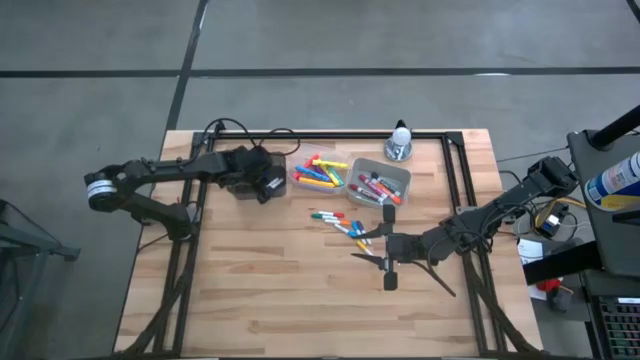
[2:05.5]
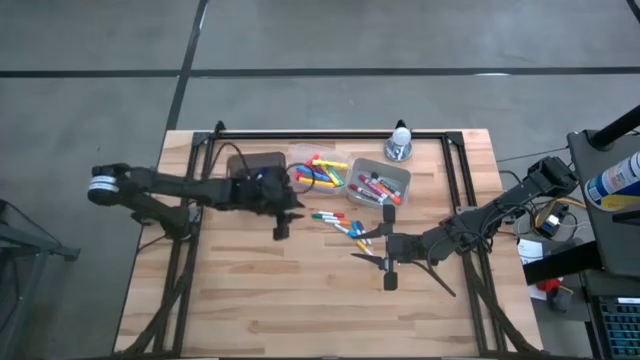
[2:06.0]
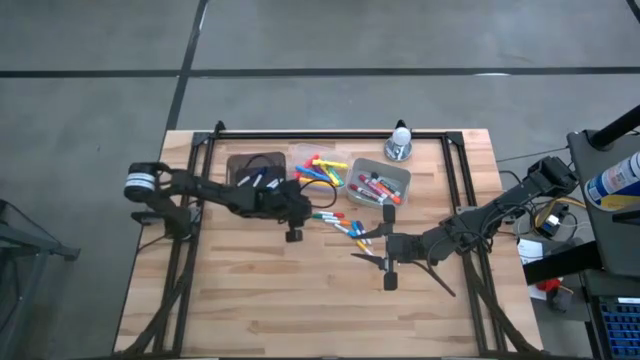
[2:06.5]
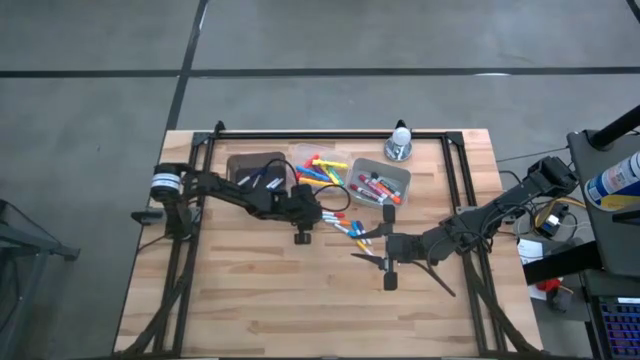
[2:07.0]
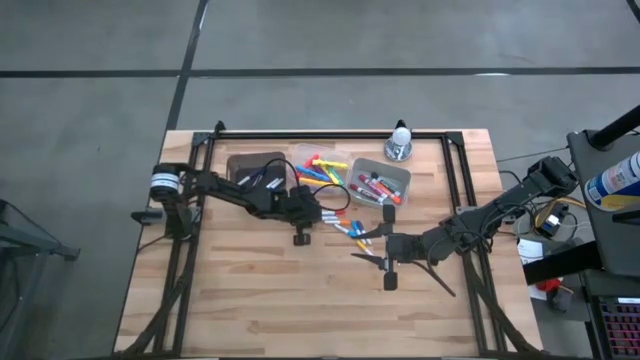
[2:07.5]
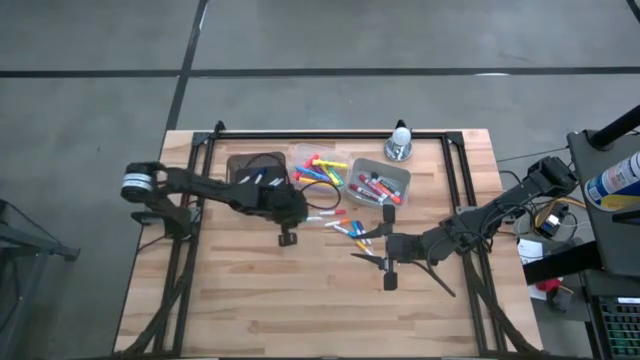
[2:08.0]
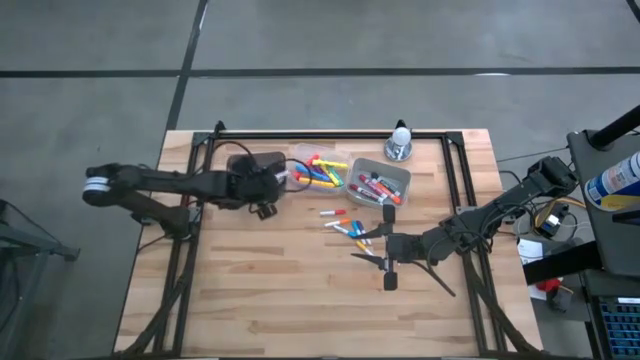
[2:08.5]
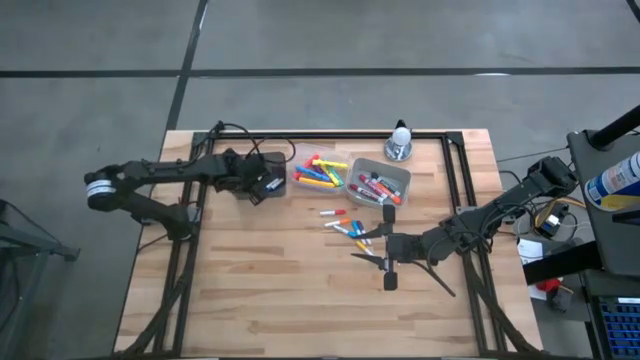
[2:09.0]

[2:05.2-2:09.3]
Task: Pick & Place Markers
Put the green mini marker into the black bin

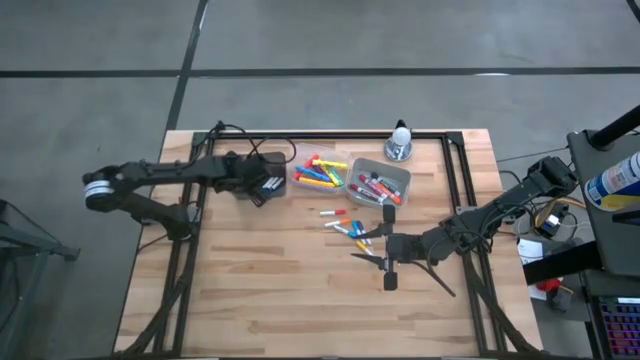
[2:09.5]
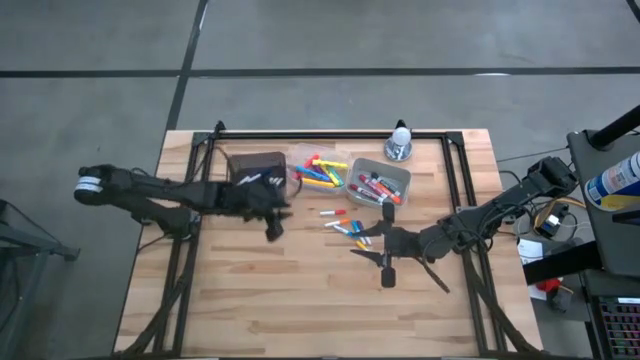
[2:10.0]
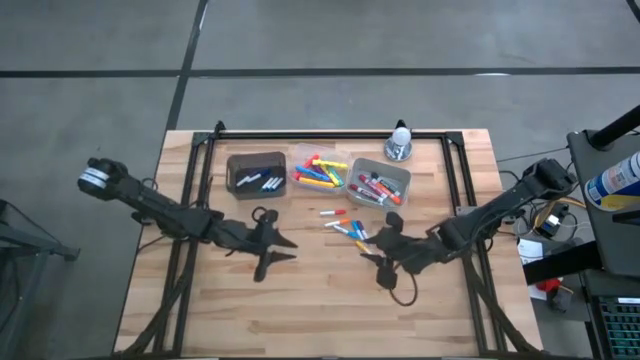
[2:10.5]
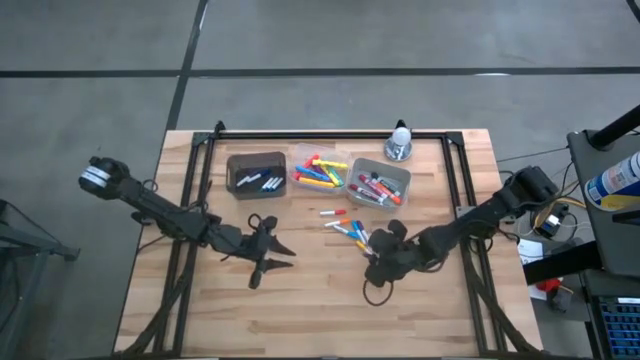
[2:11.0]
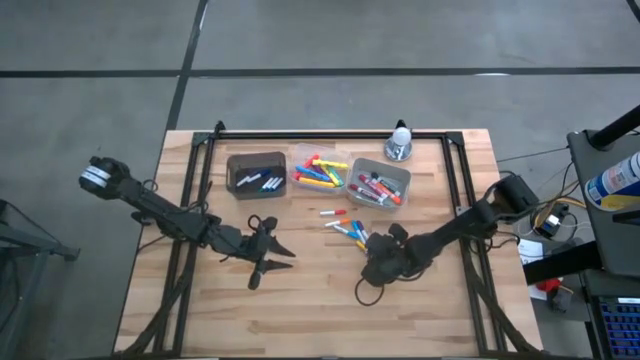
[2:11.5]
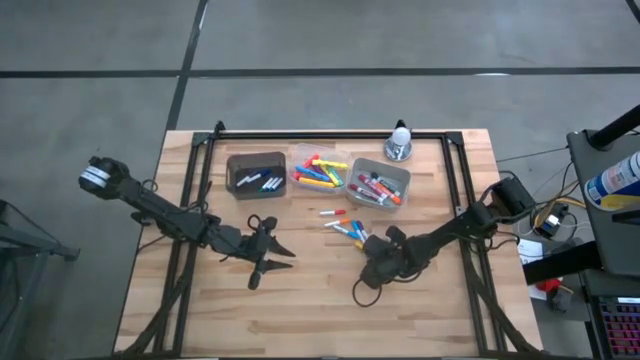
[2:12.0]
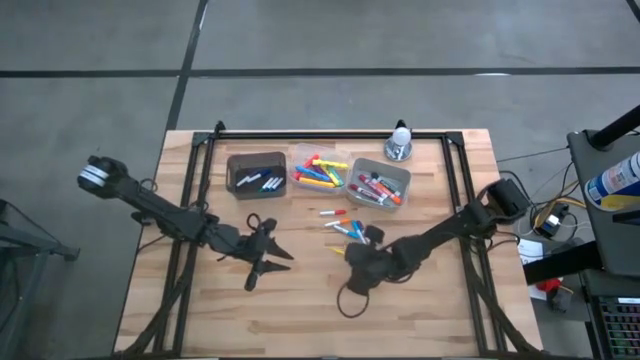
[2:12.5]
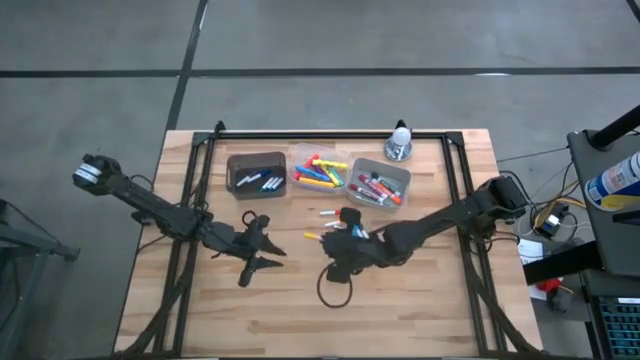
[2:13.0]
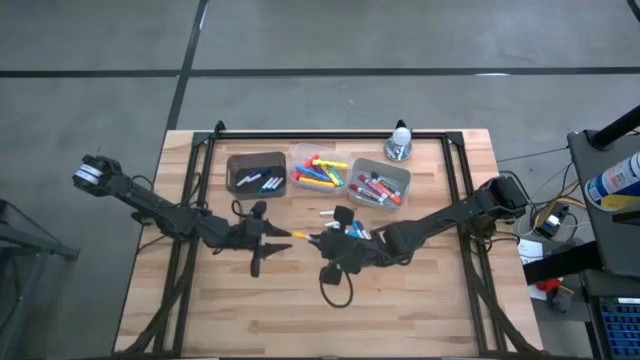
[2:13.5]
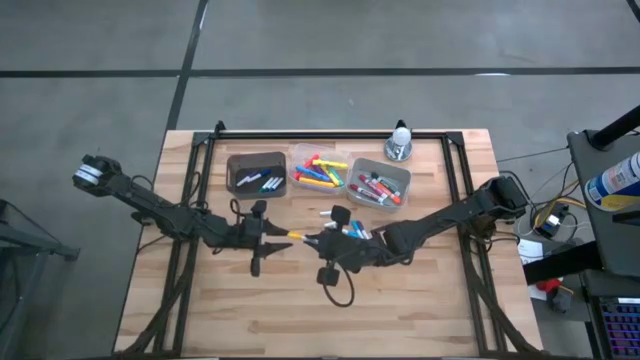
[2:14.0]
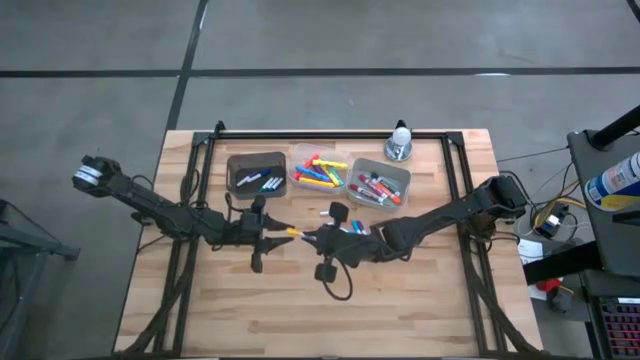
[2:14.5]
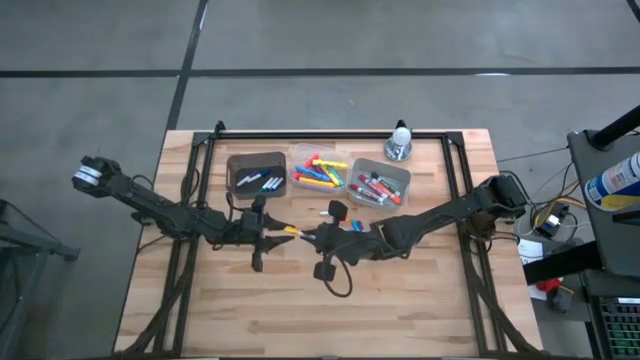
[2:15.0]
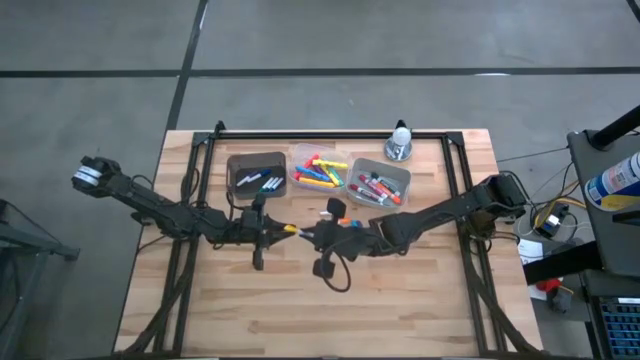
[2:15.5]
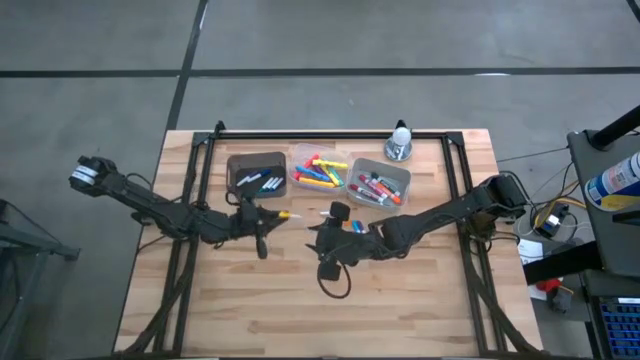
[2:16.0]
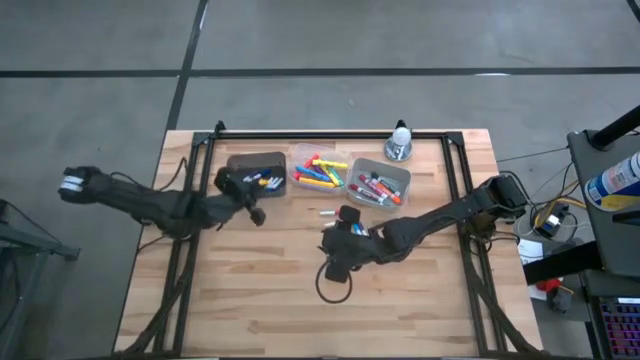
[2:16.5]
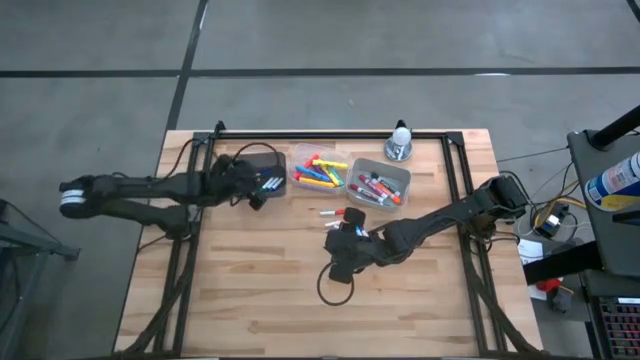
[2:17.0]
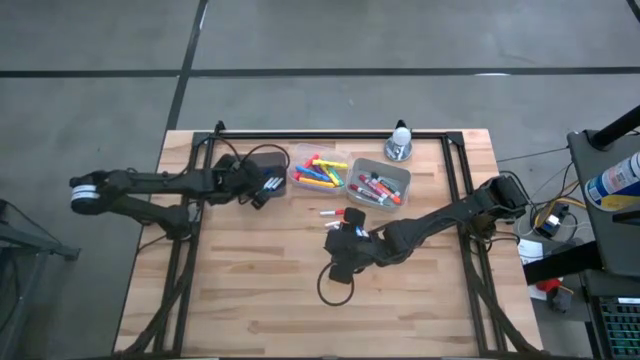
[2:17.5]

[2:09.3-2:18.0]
Put the yellow mini marker into the black bin

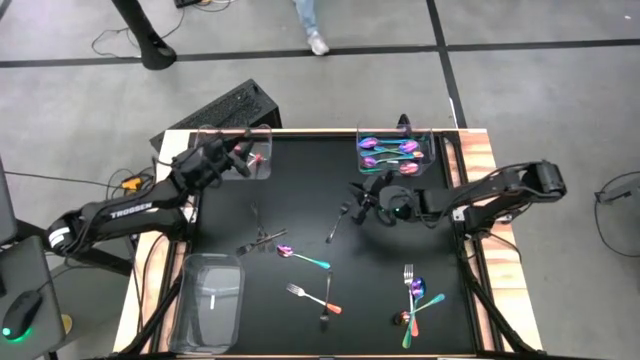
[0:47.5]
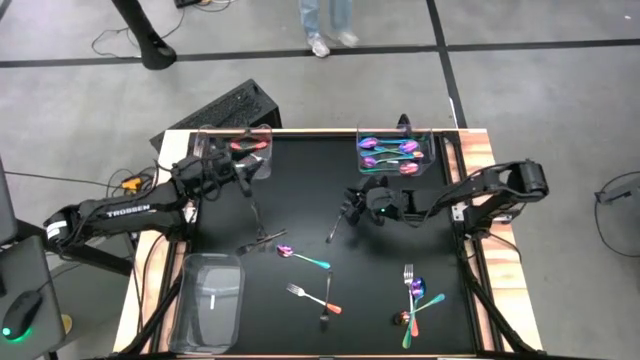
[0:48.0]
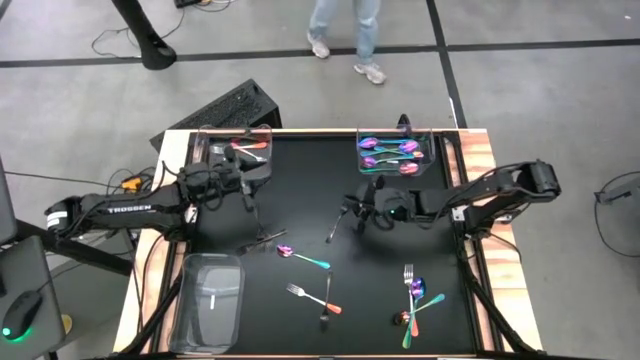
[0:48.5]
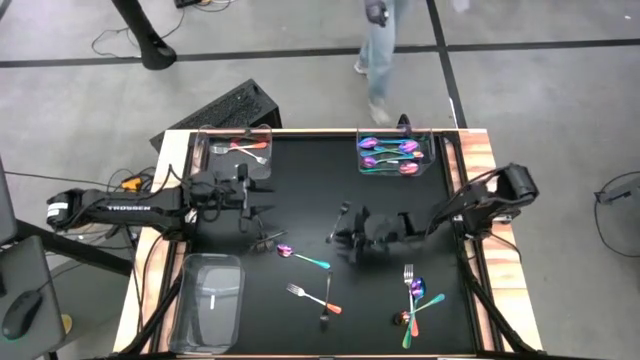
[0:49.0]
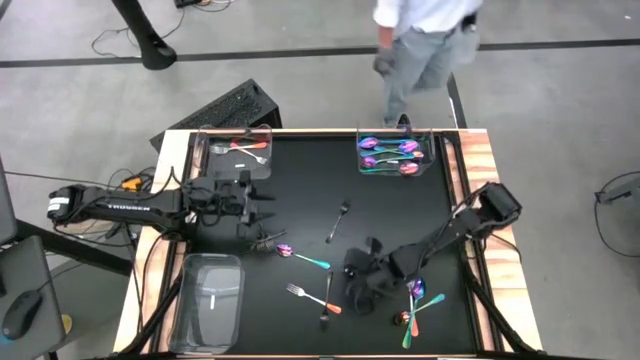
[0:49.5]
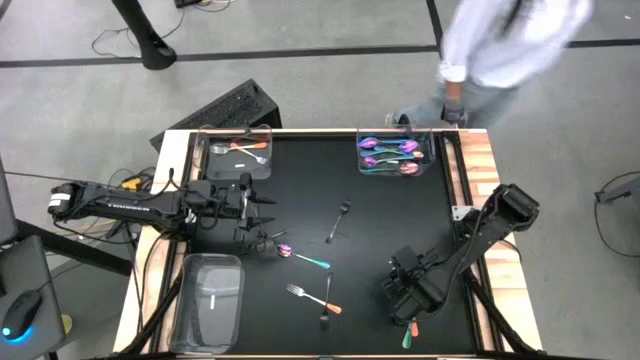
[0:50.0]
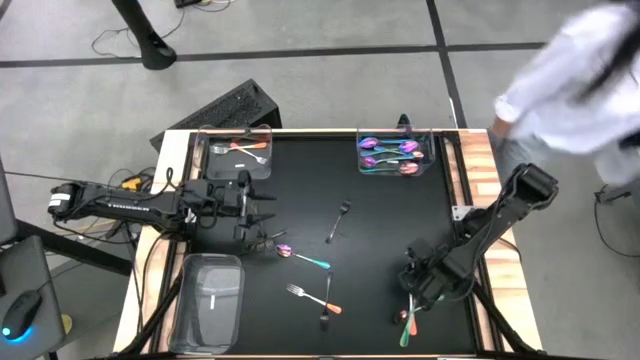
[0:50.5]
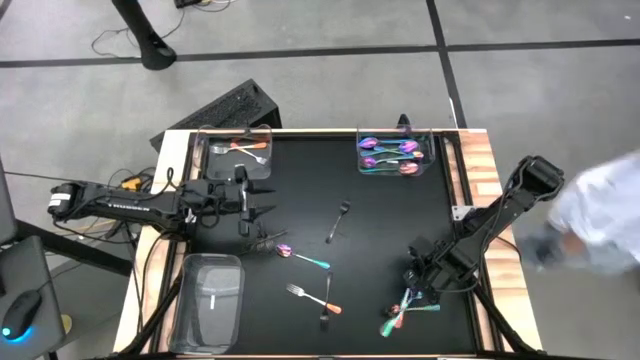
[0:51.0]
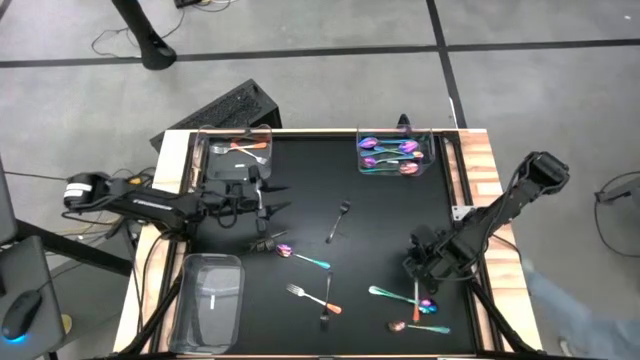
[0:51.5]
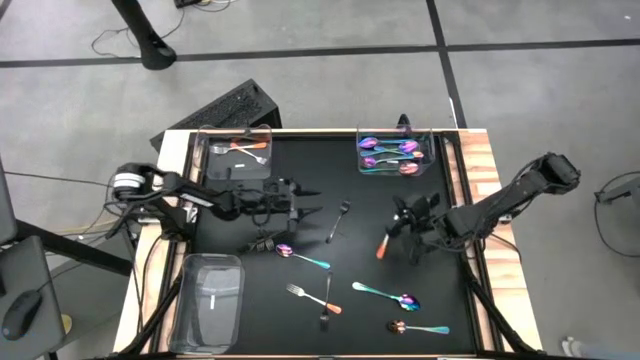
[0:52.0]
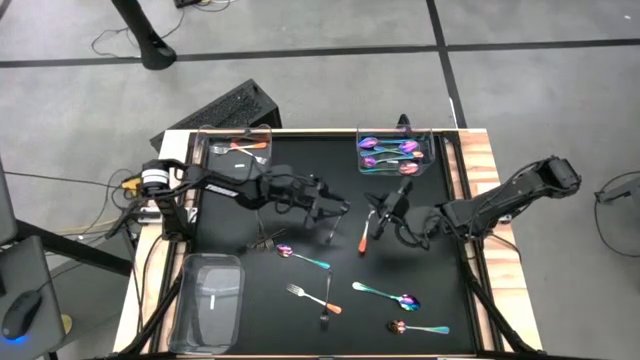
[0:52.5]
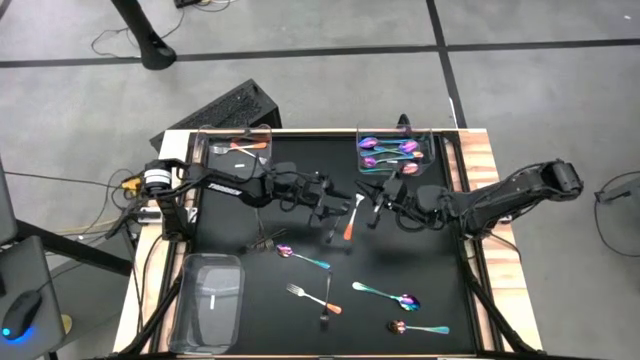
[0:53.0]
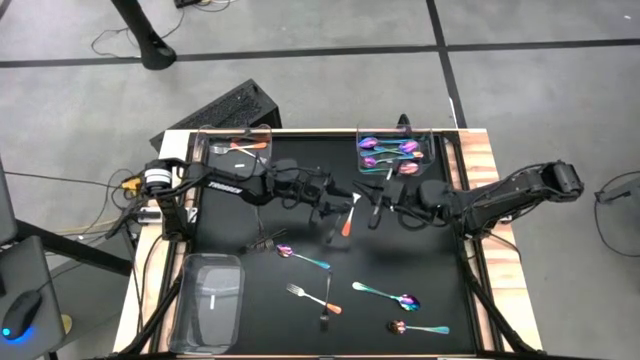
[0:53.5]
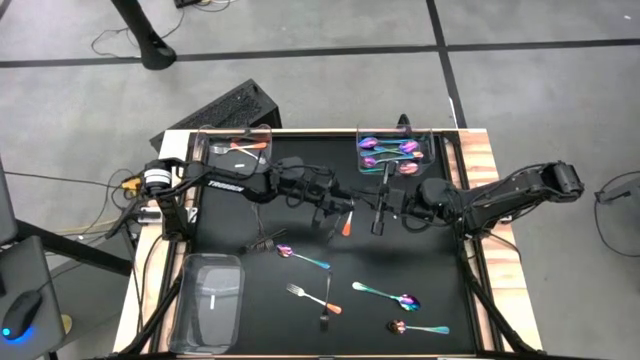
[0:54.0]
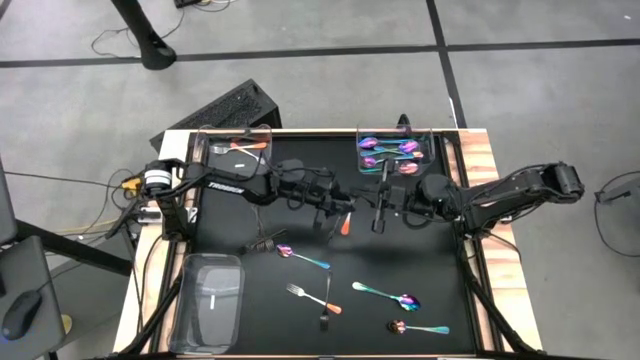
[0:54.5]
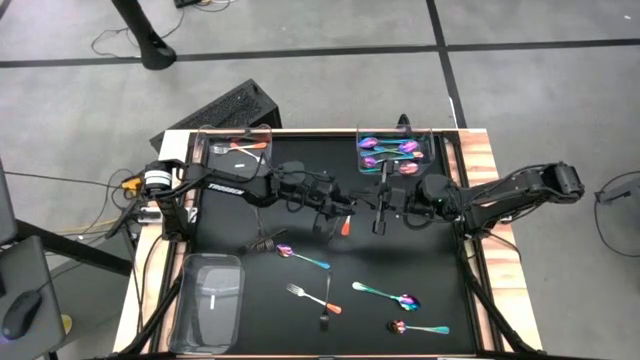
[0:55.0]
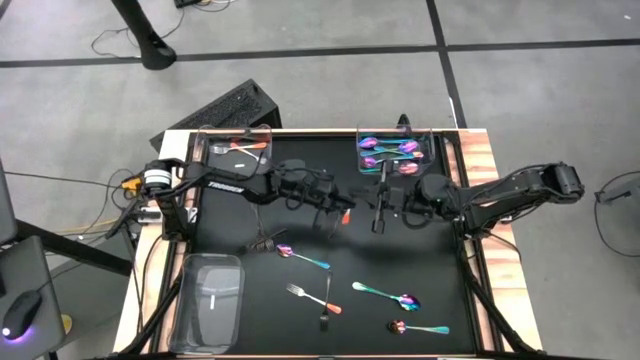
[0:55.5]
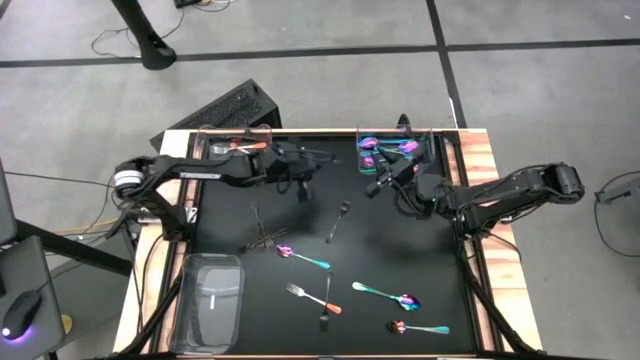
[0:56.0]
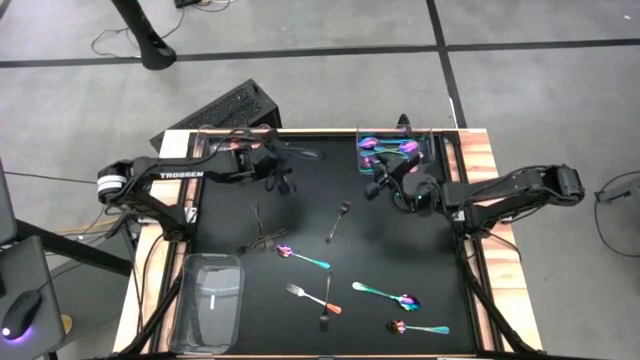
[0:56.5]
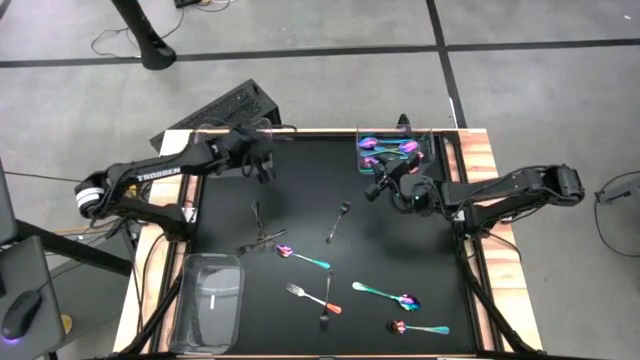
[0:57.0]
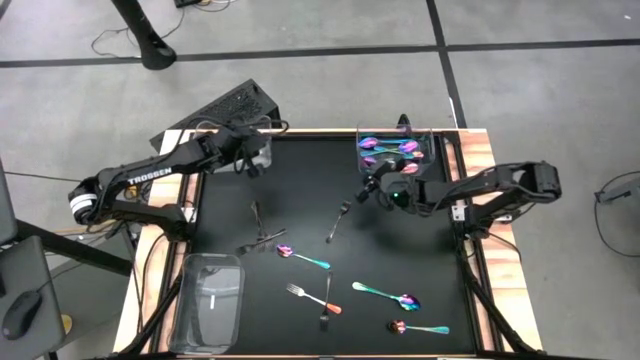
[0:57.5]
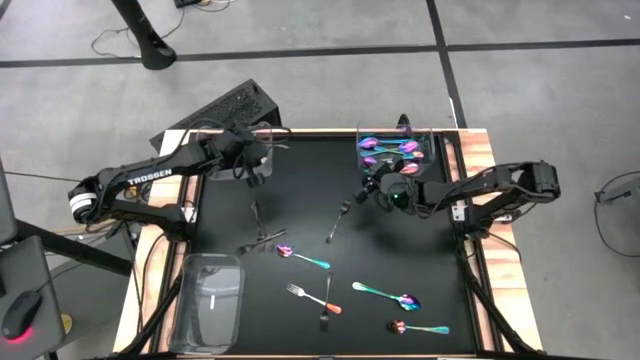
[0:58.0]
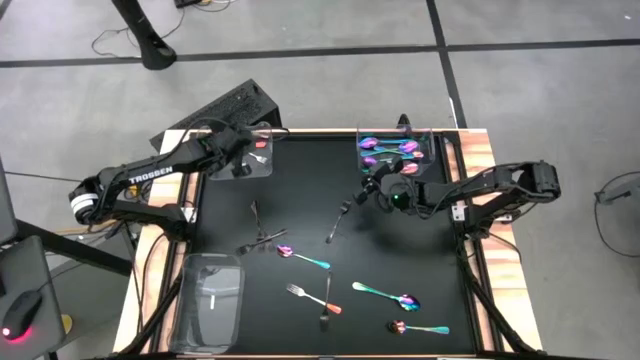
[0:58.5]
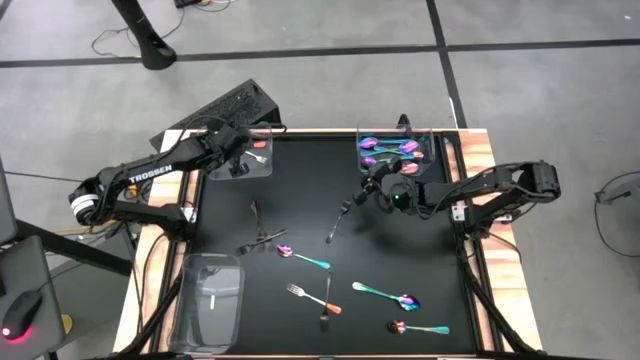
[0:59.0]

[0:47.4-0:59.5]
Task: Sort silverware by color (type)
Put the orange fork into top left transparent bin
